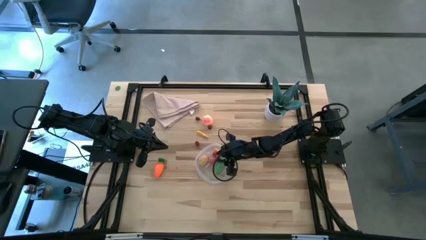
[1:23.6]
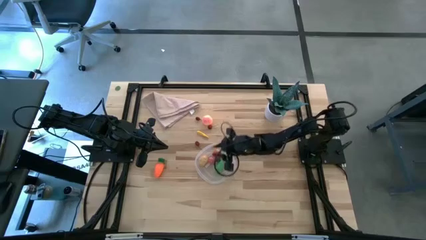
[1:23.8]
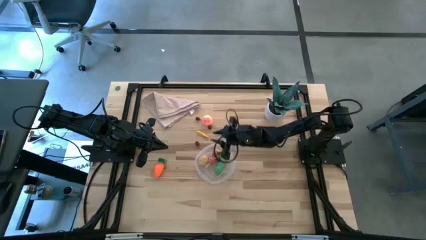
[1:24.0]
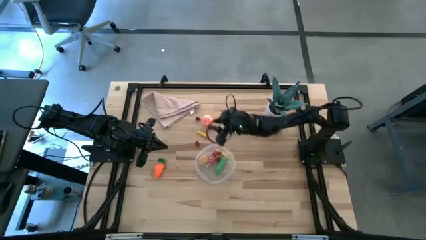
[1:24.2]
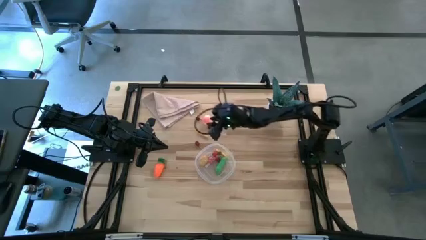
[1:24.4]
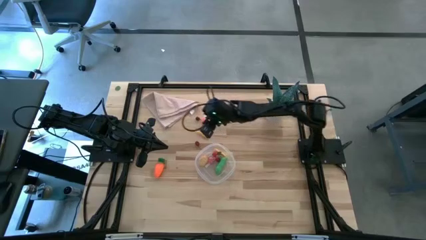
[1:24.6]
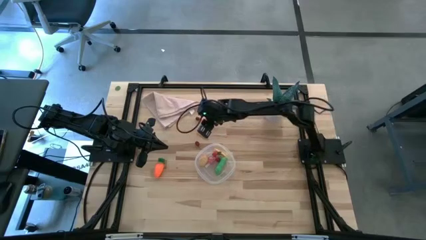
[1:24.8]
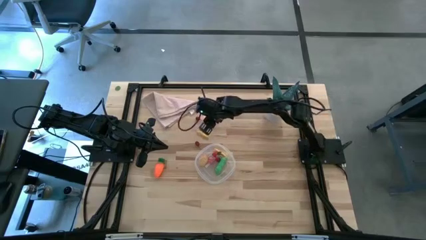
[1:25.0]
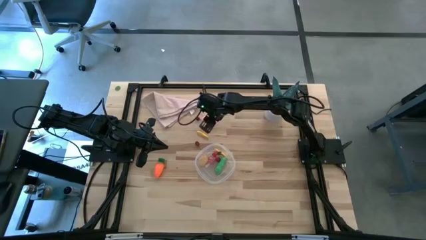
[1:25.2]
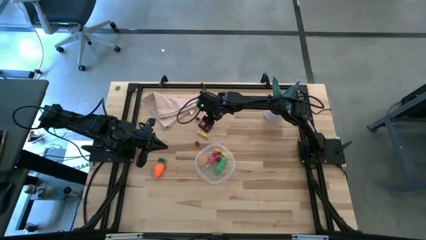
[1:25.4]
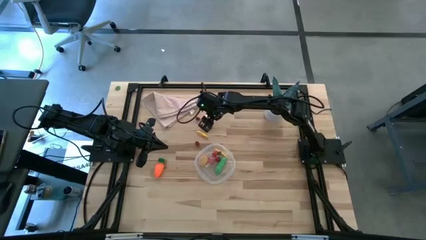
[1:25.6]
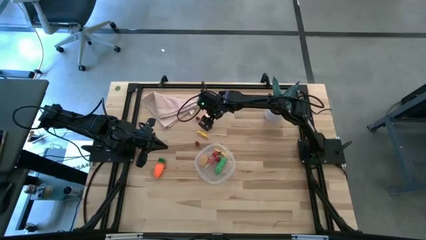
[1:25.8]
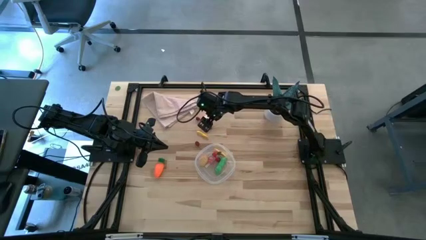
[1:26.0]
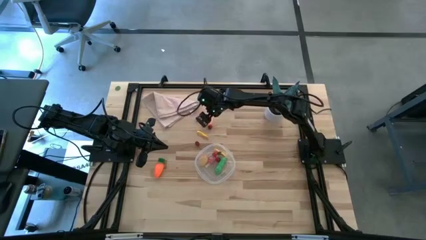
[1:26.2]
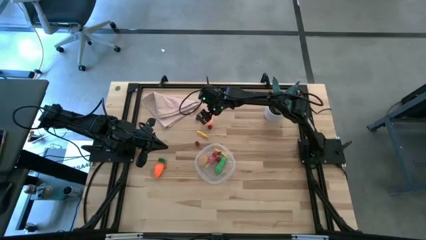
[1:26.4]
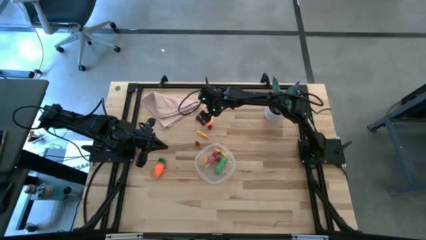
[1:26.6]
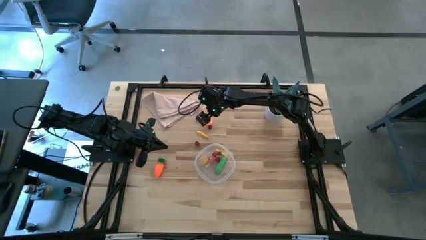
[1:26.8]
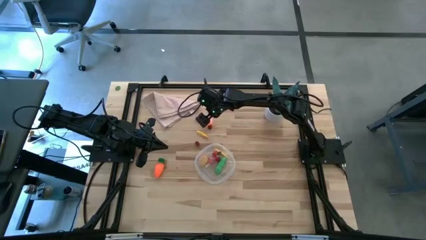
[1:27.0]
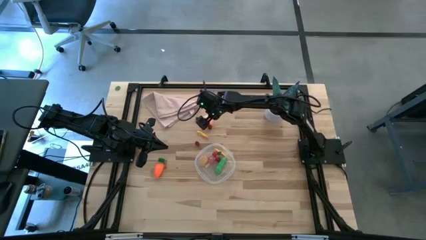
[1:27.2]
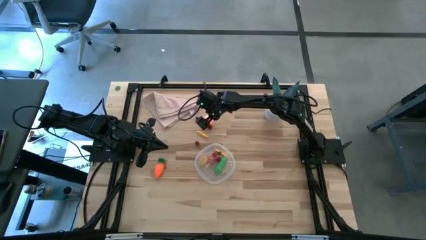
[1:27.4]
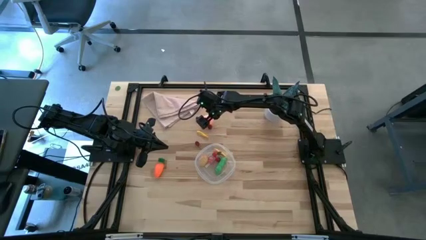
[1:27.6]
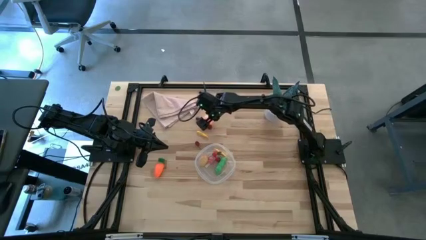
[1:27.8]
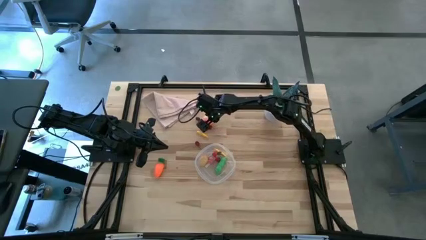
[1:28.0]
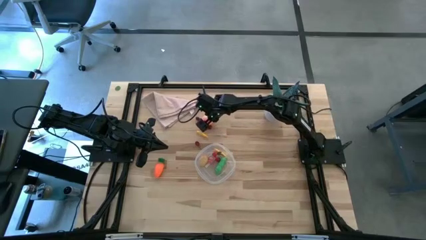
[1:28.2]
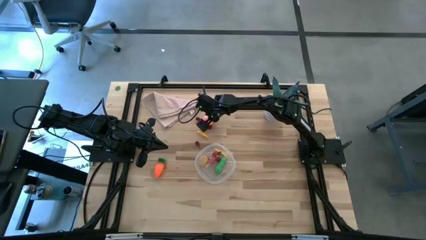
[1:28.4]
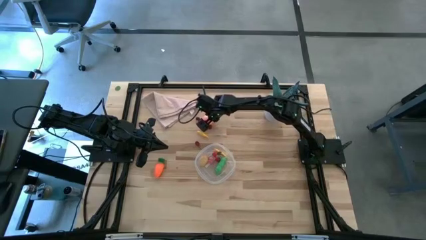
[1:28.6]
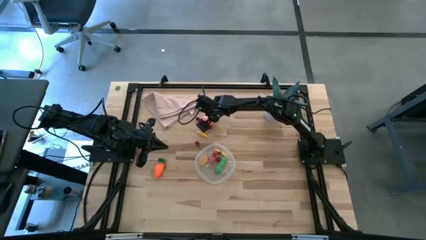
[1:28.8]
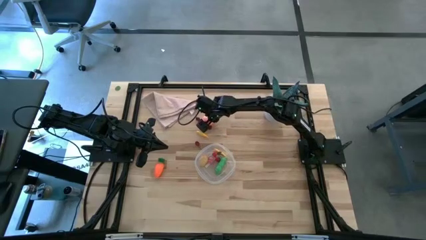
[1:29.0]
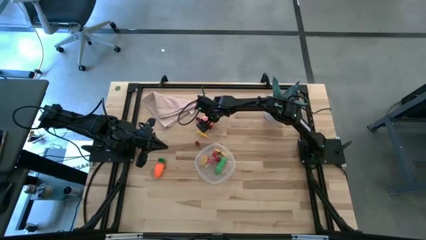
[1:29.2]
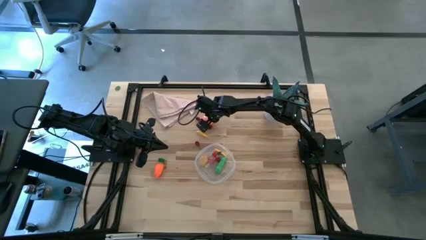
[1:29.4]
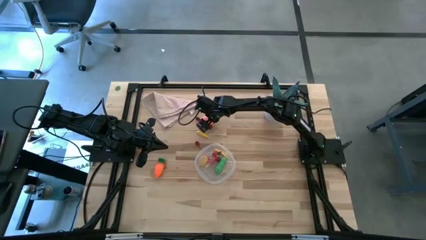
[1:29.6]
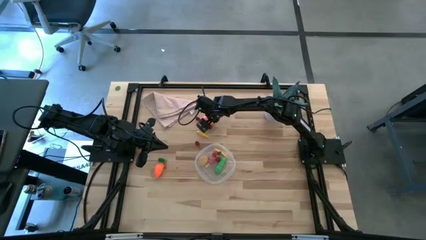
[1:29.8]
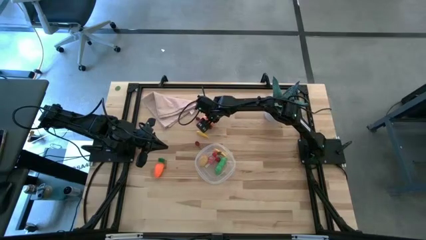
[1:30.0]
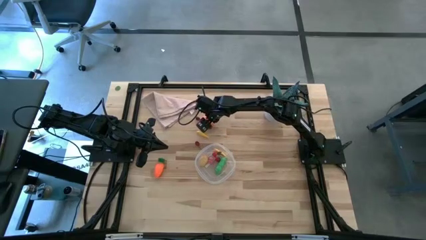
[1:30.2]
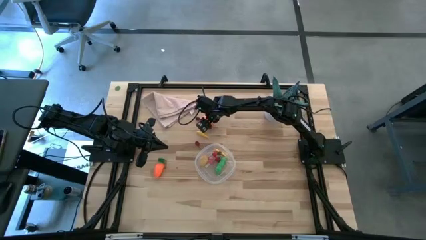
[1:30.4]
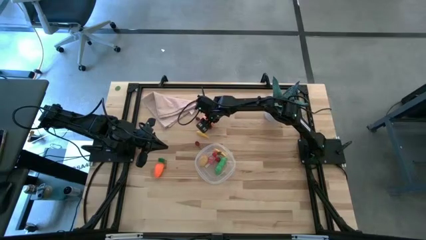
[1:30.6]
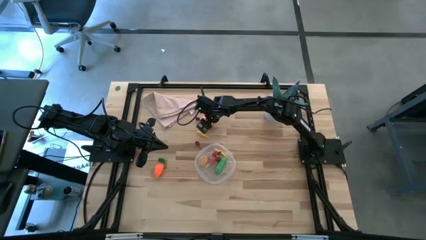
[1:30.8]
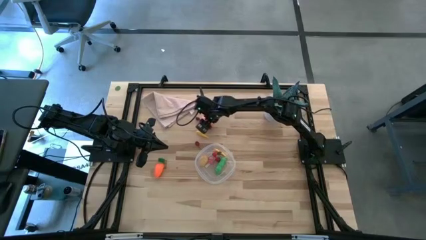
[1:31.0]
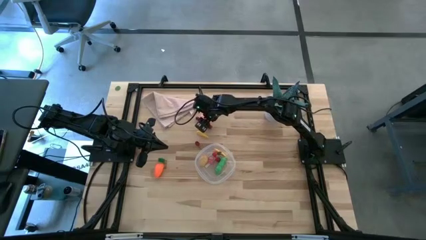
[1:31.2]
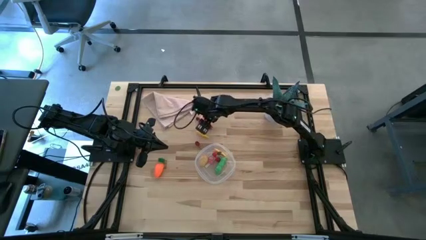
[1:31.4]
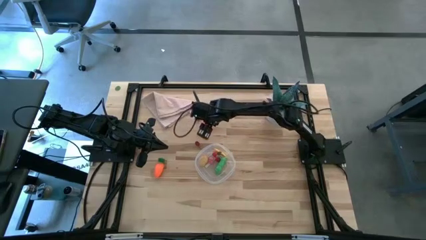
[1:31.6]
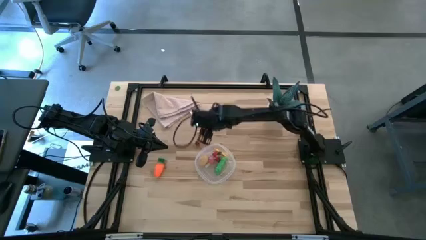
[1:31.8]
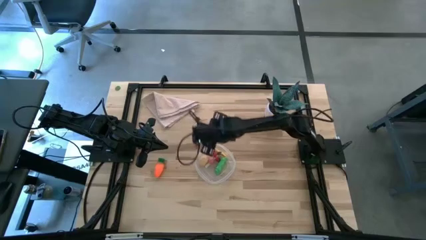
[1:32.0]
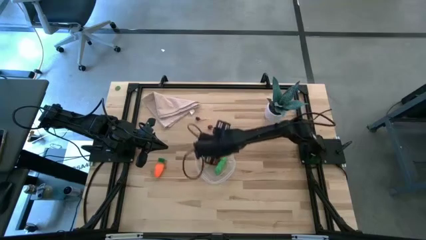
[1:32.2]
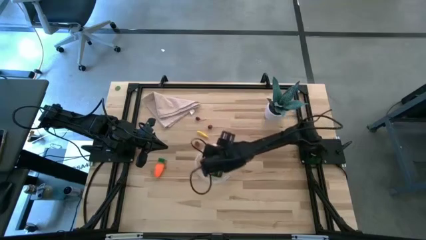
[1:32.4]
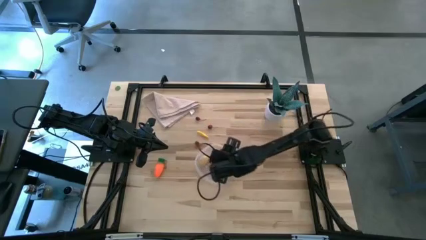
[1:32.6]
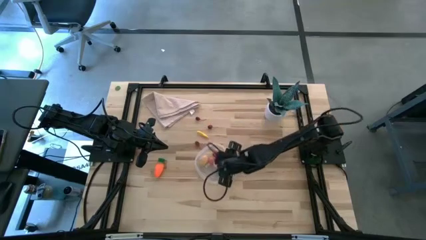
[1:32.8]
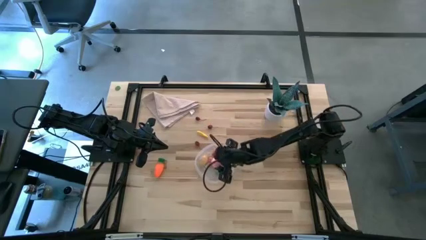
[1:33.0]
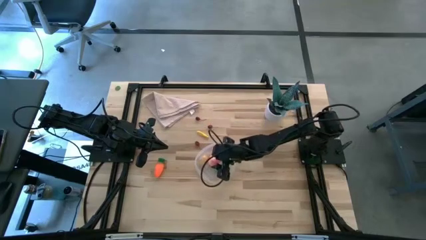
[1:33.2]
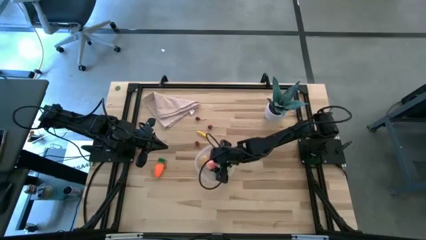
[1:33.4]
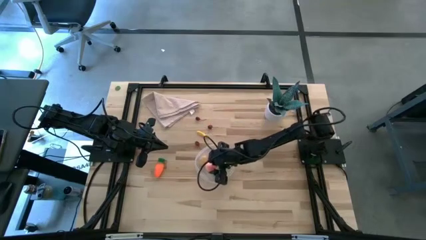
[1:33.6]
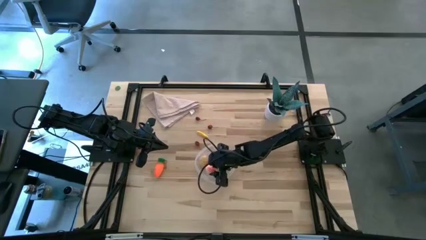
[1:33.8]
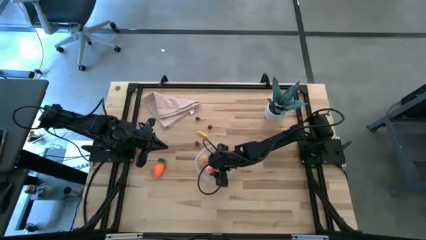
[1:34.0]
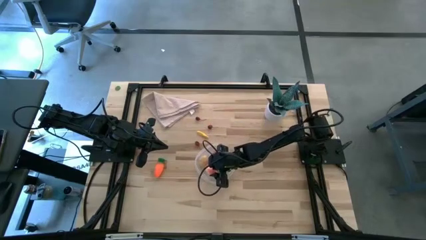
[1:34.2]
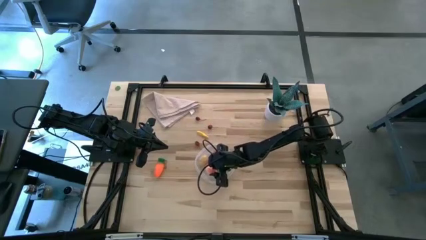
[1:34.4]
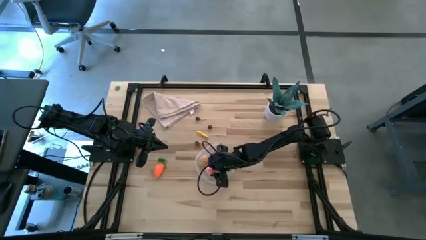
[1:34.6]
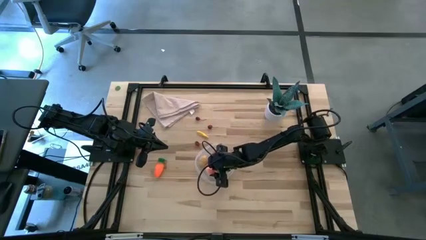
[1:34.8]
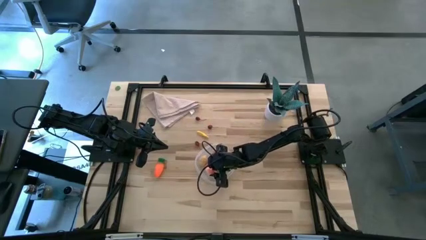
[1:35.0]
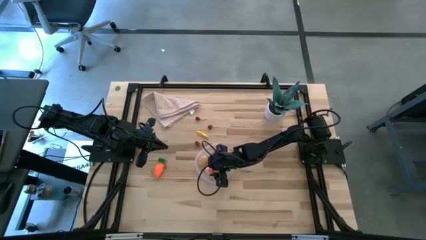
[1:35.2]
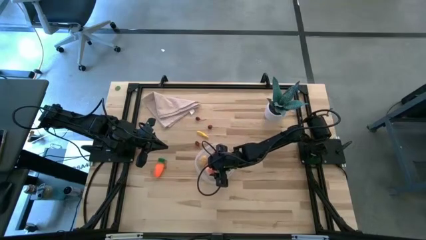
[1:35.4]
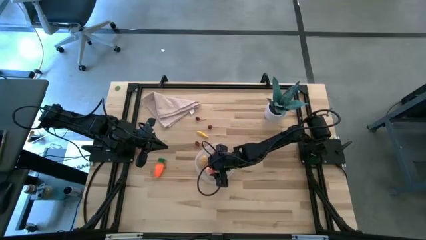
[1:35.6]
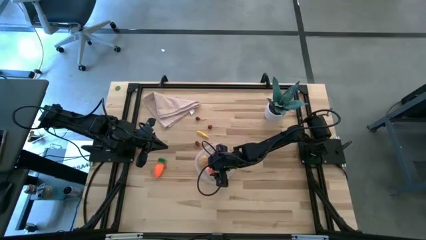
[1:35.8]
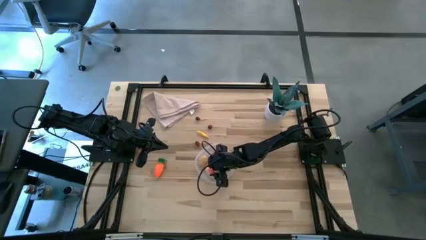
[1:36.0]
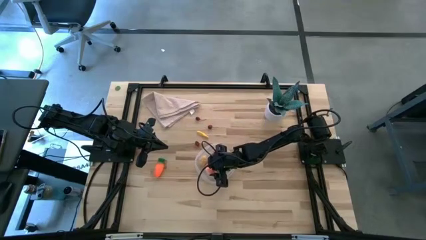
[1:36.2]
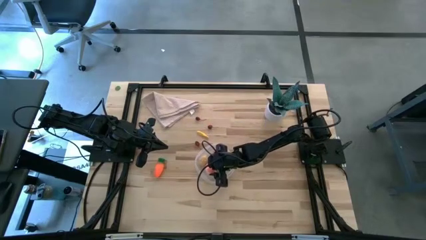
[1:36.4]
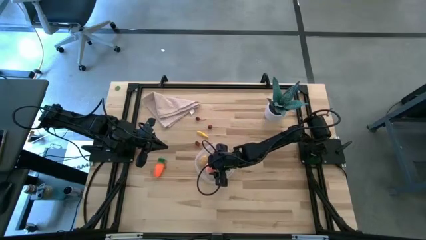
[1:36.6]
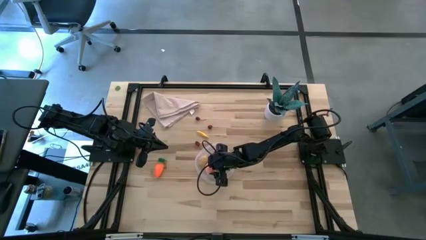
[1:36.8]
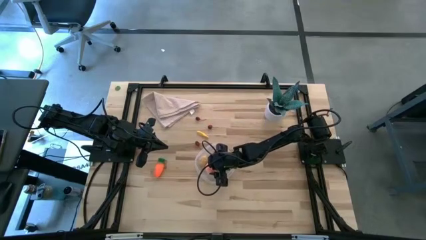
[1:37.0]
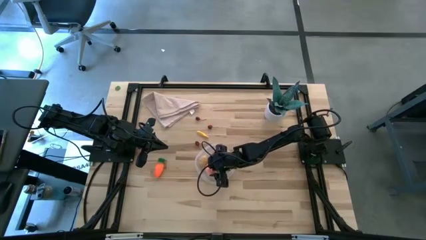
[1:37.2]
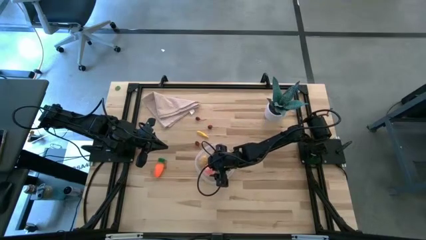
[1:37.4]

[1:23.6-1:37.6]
Task: Pick and placing Produce into tupperware
Put the peach into the transparent bin

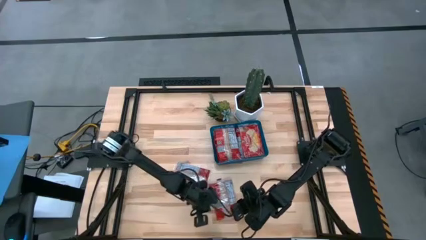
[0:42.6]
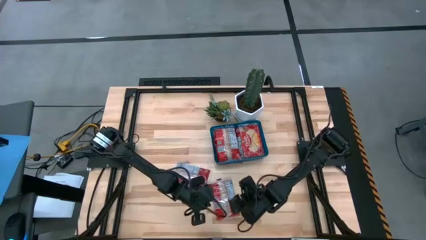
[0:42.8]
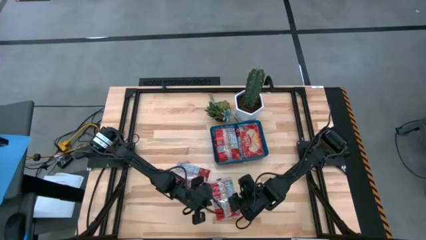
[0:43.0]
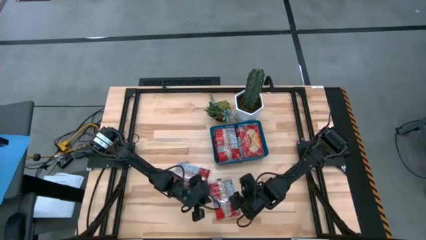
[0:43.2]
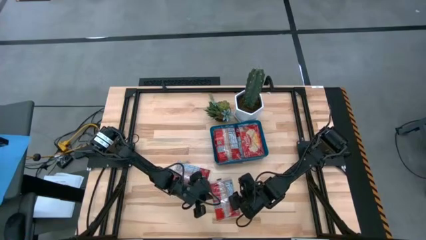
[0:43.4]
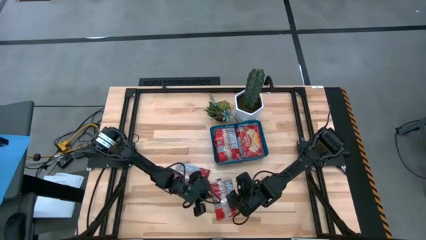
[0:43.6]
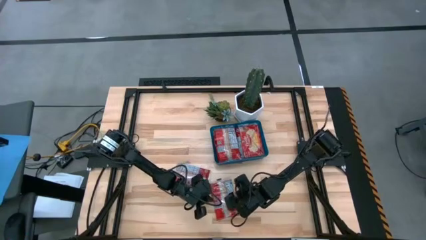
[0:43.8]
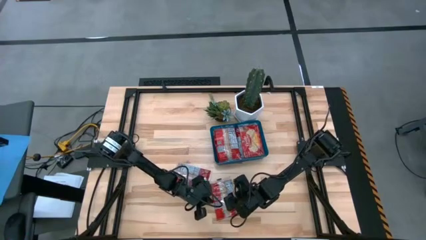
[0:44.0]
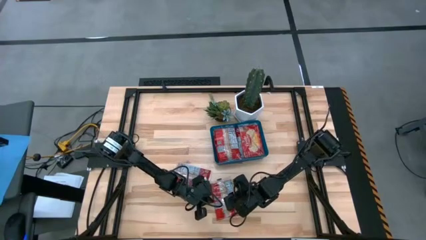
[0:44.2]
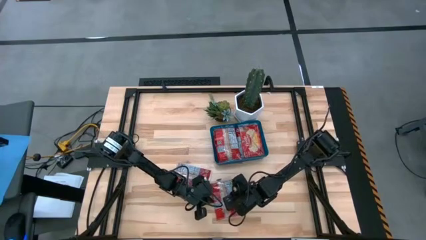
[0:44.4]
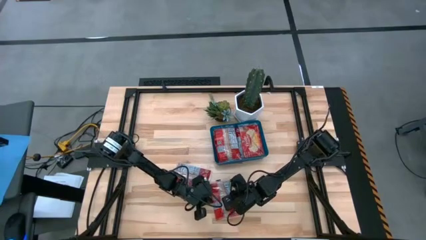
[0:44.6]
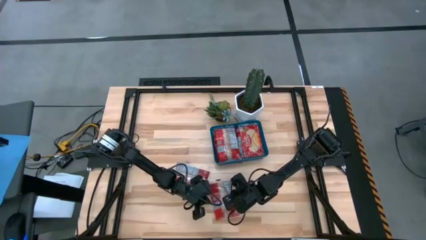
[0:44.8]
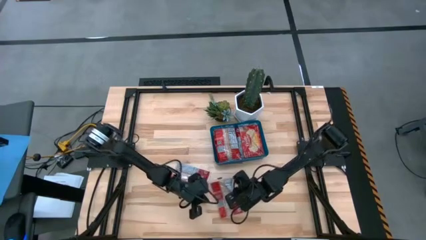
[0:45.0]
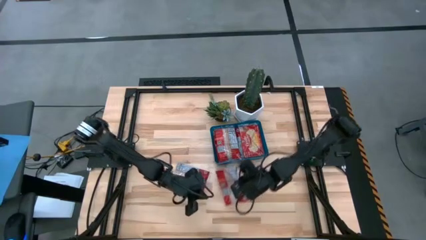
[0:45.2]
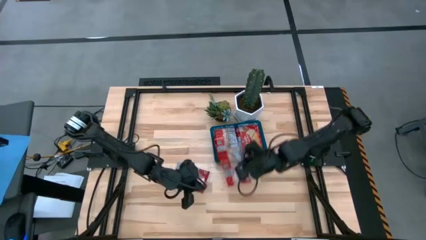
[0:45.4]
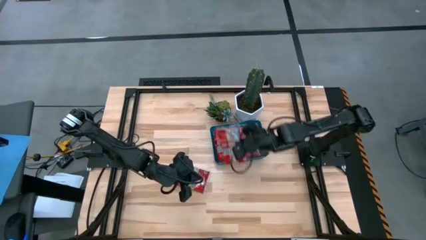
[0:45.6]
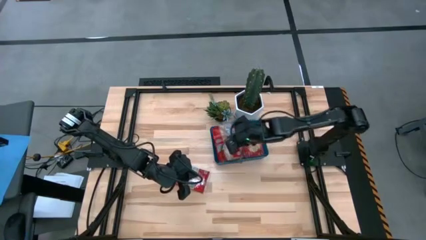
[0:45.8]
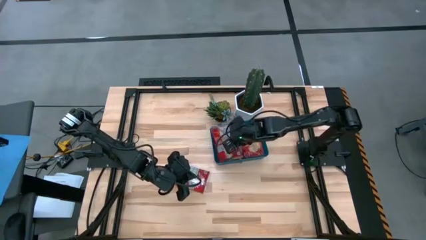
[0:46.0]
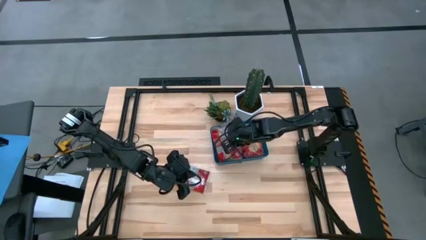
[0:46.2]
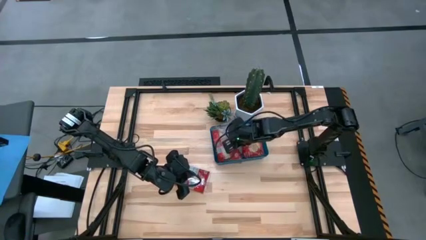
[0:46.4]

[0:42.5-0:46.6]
Task: Sort popcorn bags into baskets
Put the red popcorn bag into the blue container
